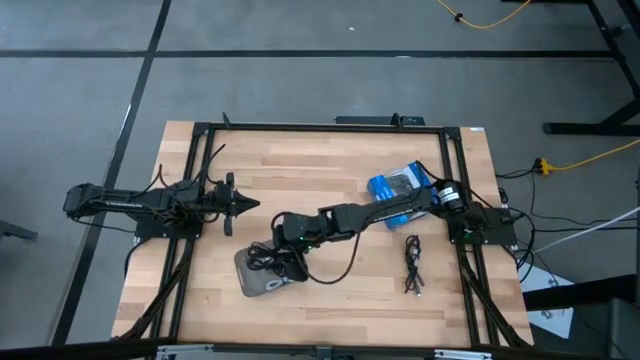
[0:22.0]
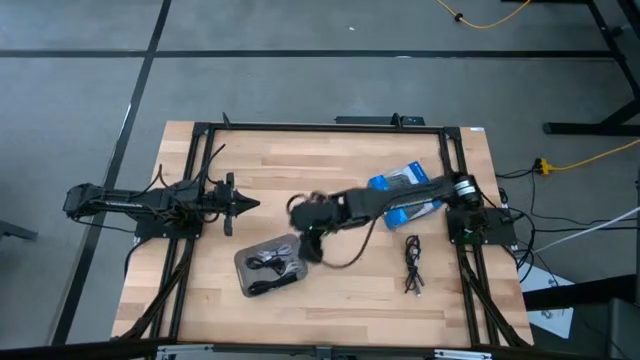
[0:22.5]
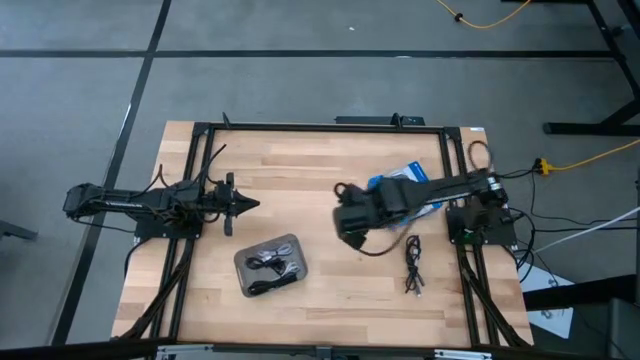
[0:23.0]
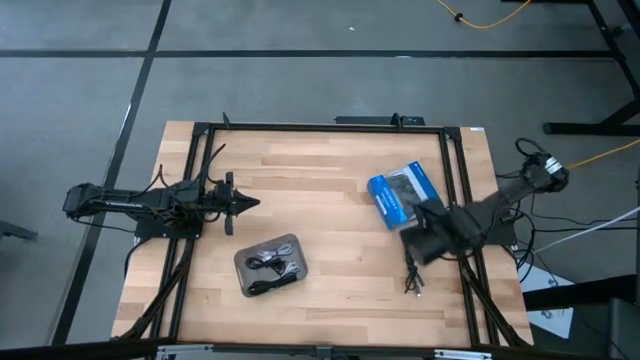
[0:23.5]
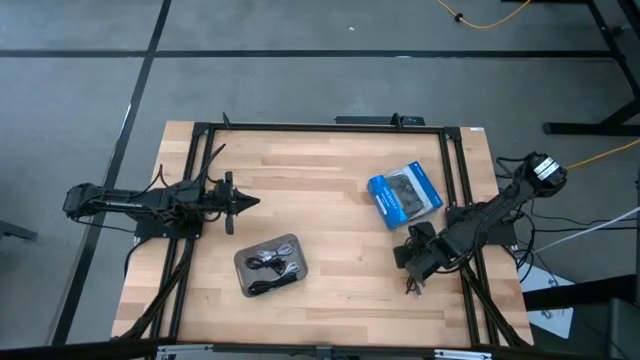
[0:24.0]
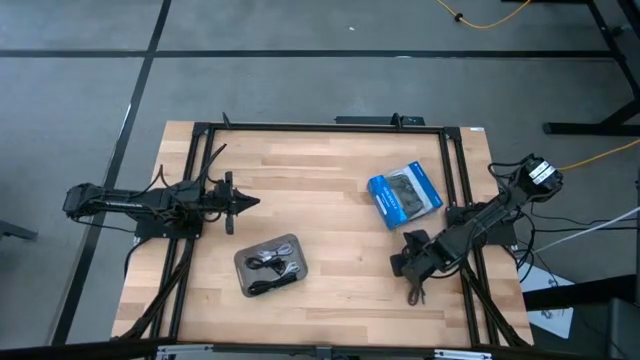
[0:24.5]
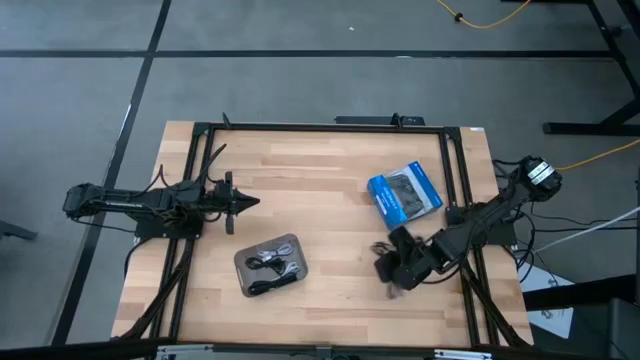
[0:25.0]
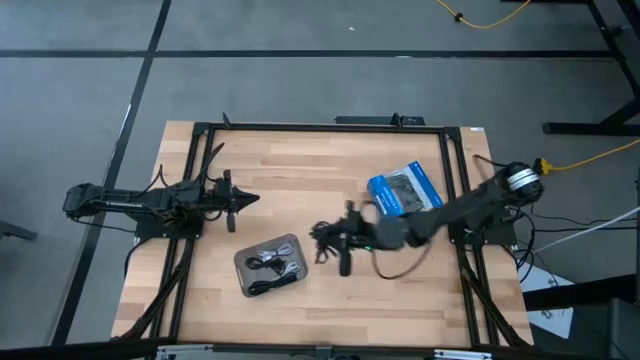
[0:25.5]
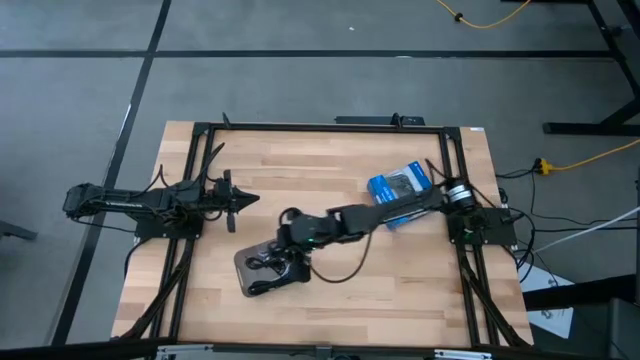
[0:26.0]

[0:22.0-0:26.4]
Task: Pick and place USB-C Cables
Put the black charger cable into the black bin

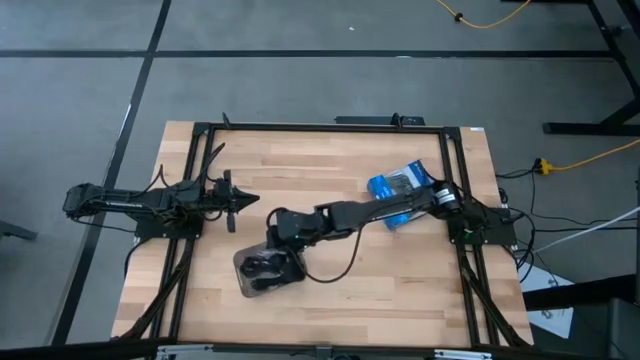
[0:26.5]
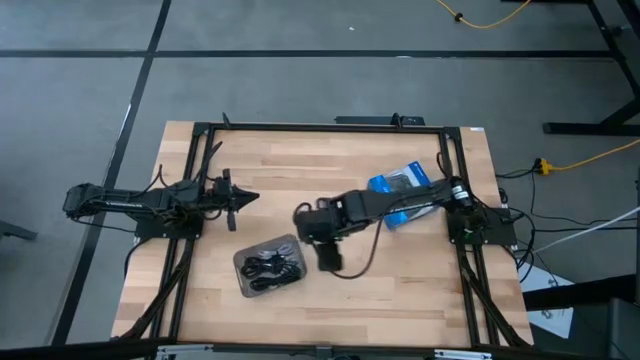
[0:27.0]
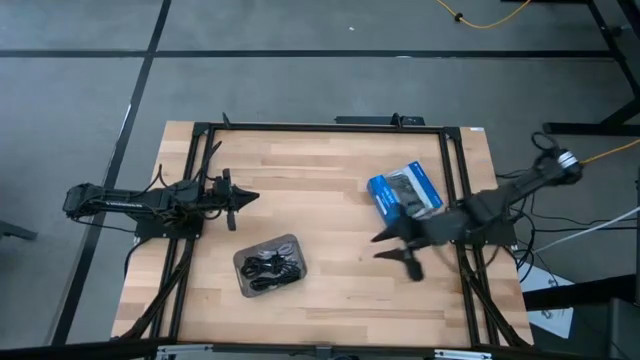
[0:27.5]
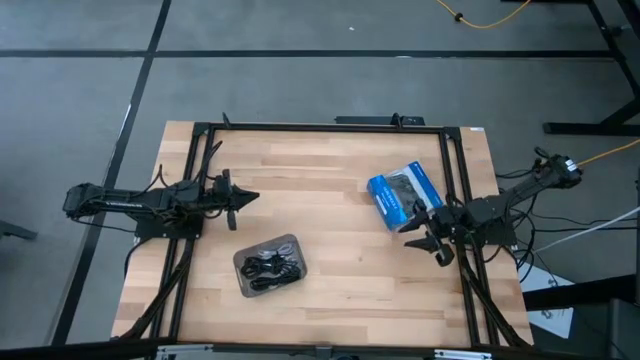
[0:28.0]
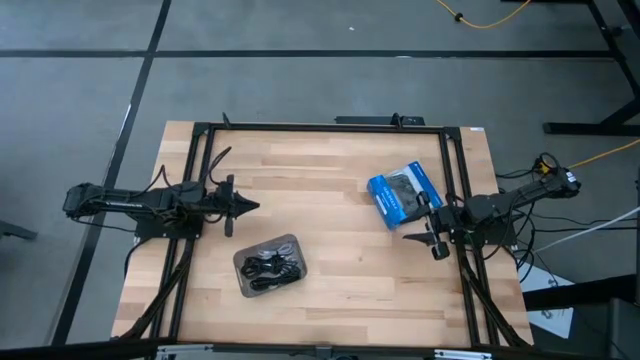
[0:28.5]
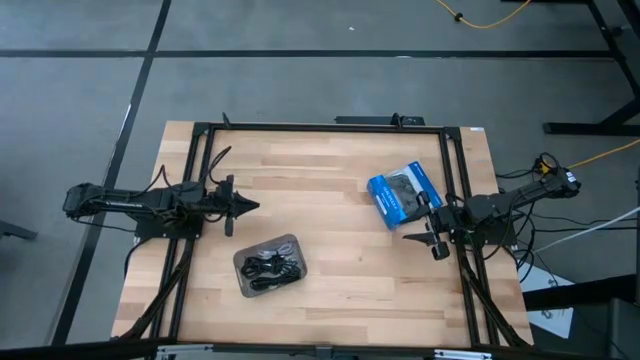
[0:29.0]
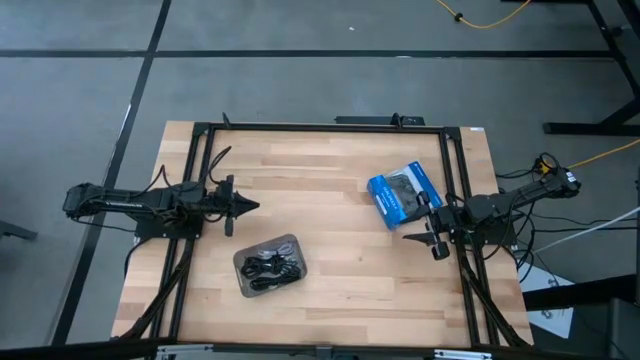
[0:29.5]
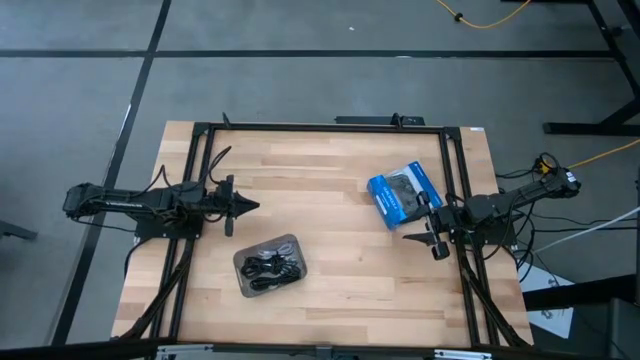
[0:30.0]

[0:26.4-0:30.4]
Return to Home Position

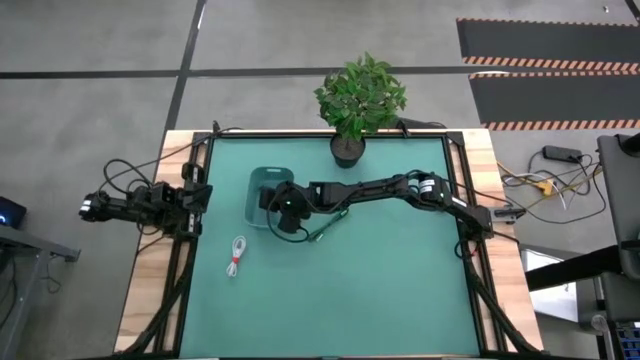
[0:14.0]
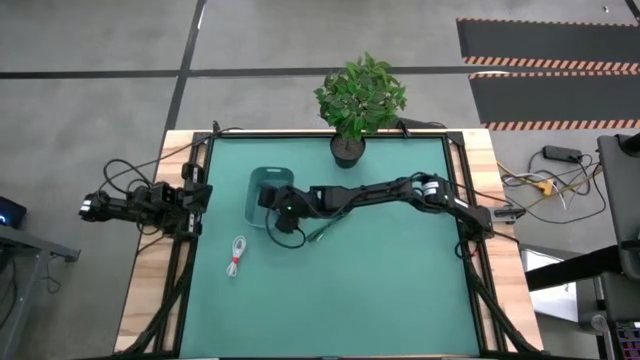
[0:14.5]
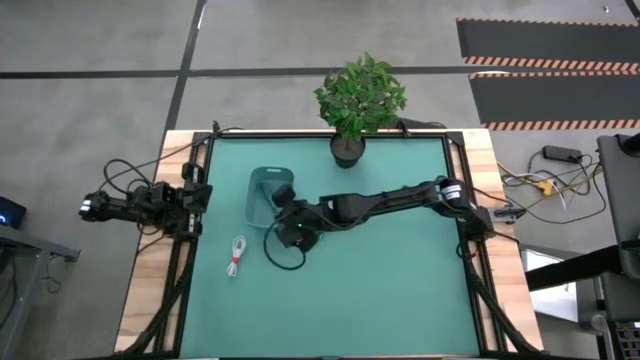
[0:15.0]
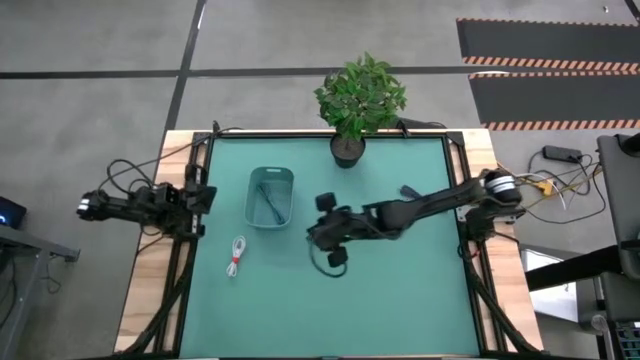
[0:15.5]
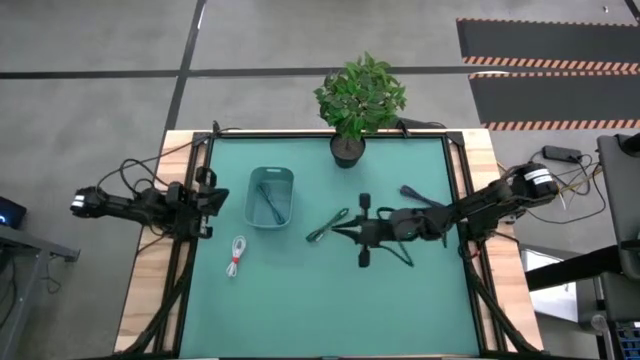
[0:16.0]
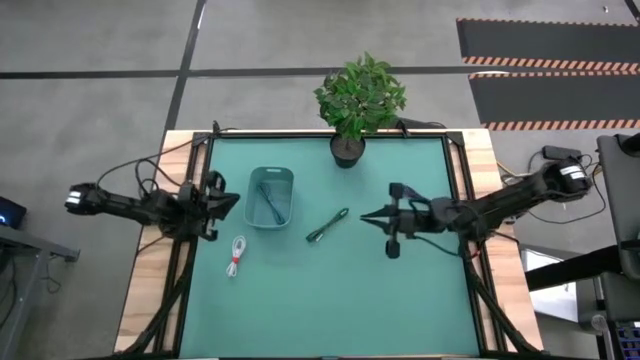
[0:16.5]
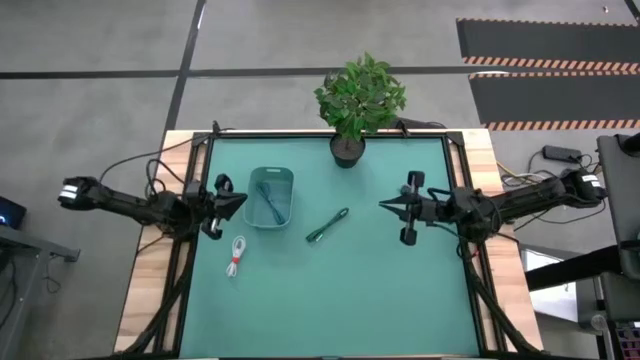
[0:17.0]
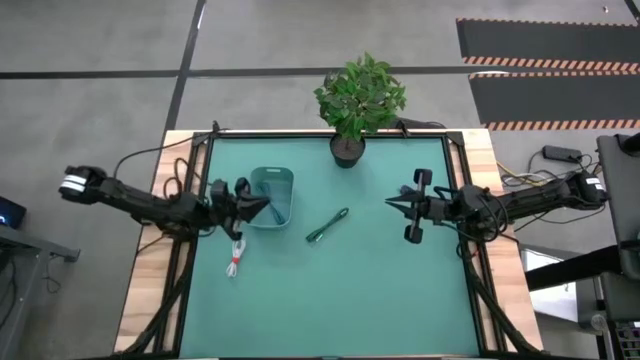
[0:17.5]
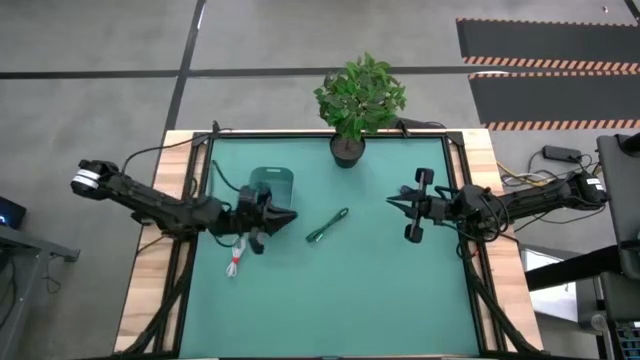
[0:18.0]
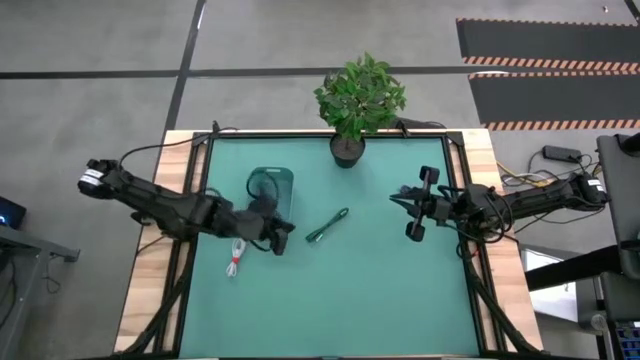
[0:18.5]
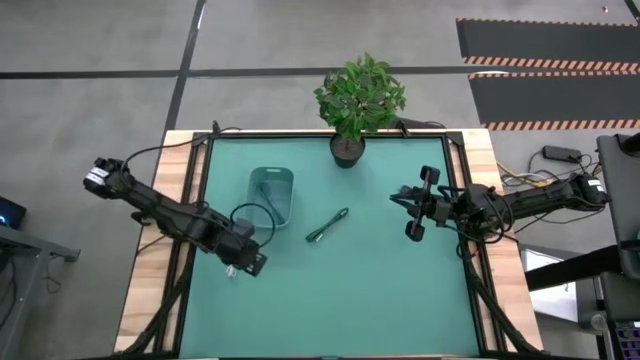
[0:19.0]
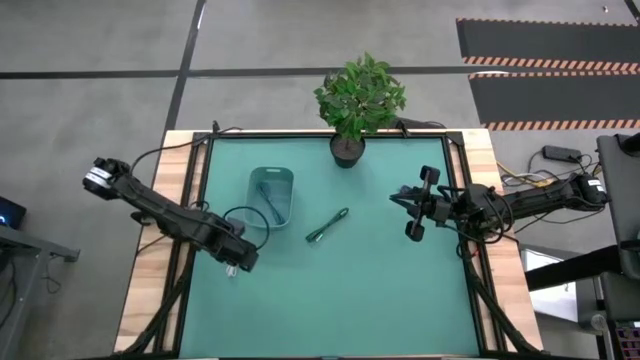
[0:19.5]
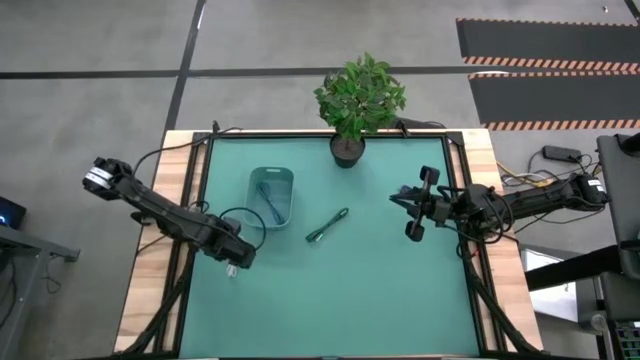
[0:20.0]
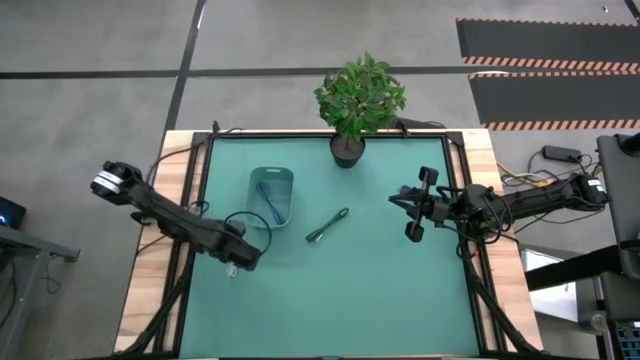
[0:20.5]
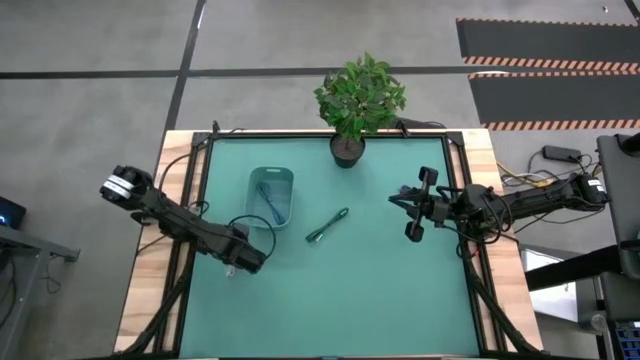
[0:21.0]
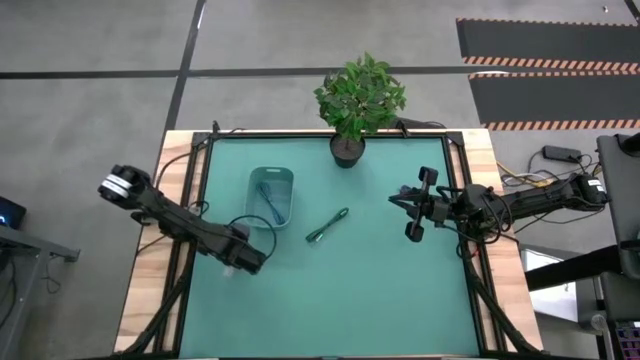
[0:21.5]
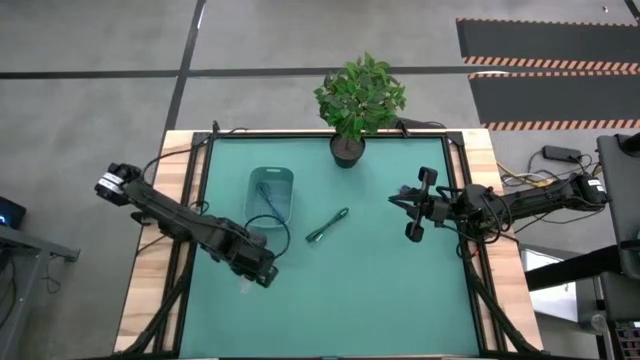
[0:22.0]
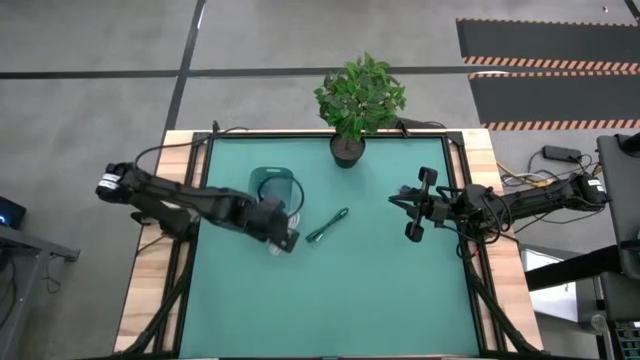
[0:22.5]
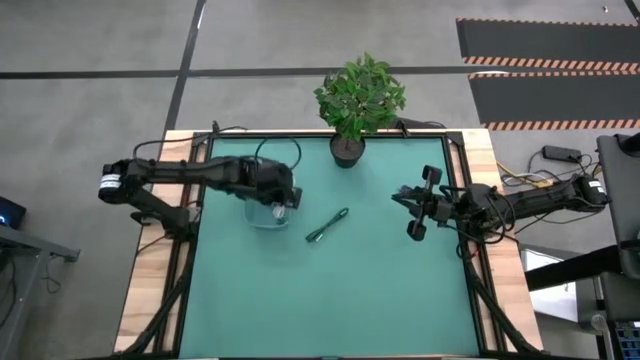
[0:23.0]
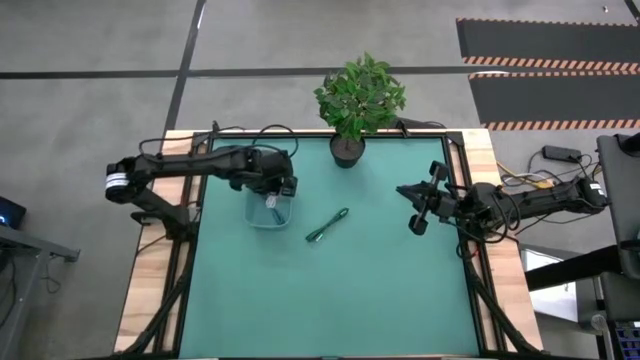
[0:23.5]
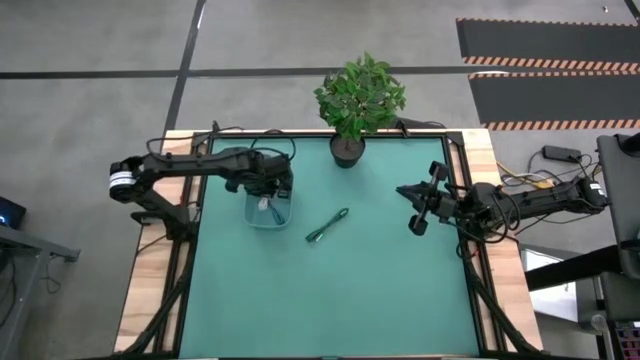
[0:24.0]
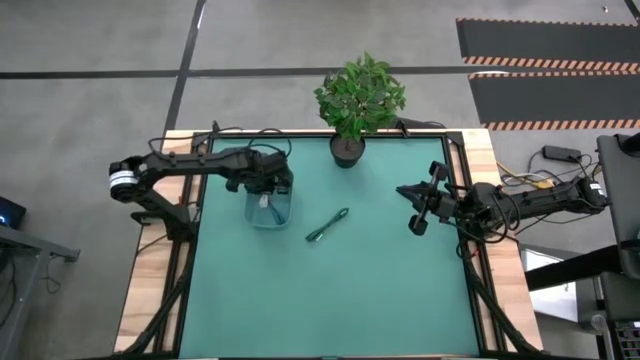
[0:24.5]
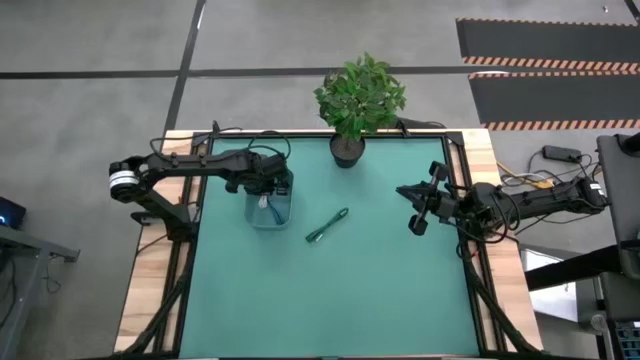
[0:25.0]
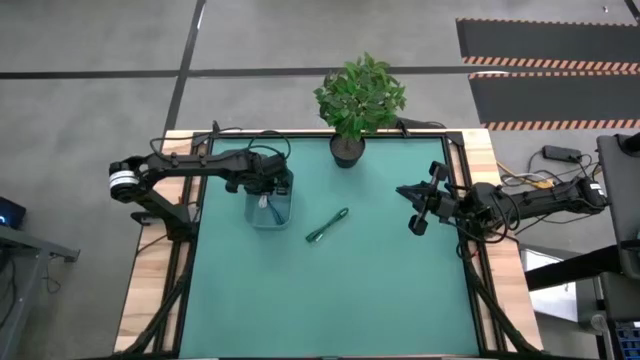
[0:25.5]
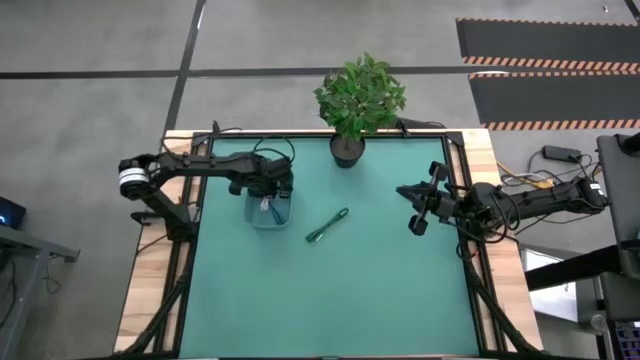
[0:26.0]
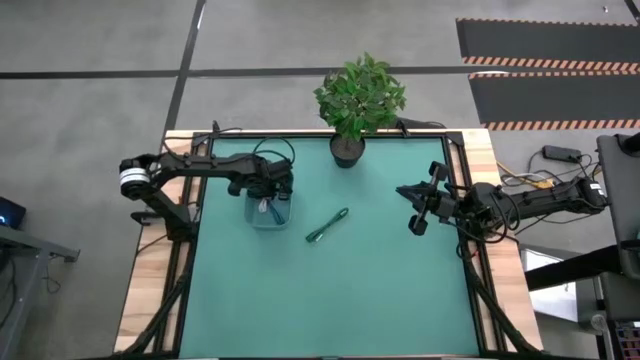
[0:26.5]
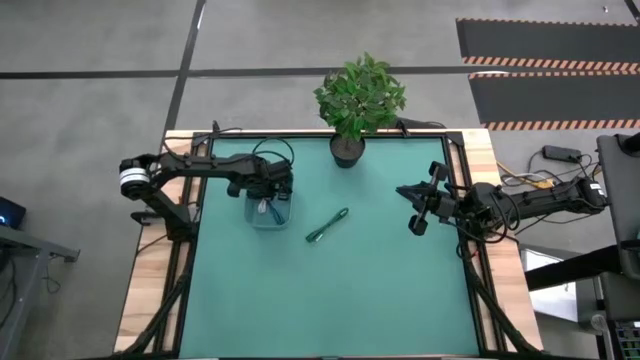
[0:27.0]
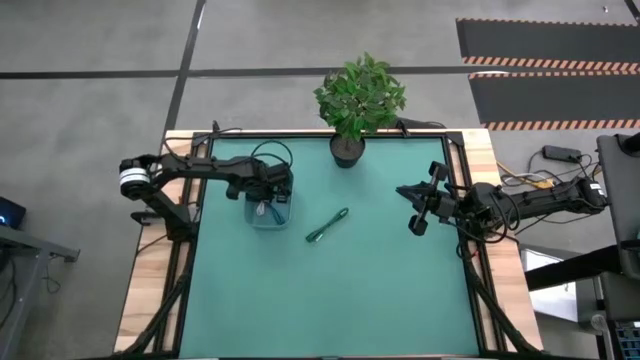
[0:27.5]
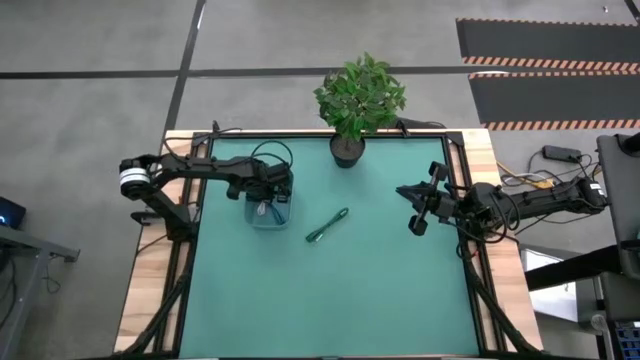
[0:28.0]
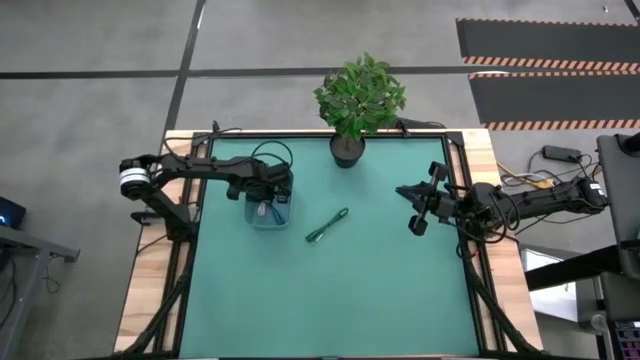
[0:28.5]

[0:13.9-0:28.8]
Task: Pick and place USB-C Cables
Put the white charger cable into the green bin
